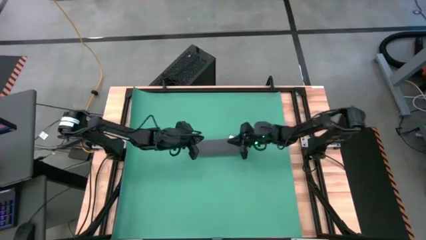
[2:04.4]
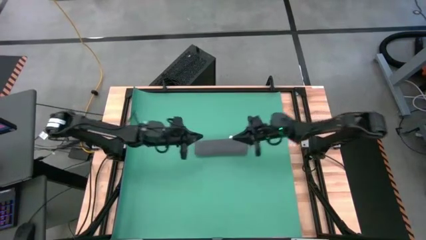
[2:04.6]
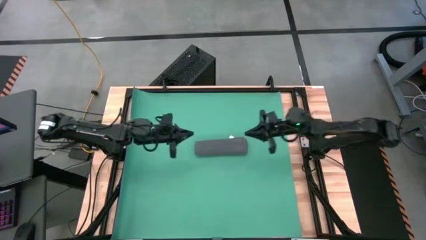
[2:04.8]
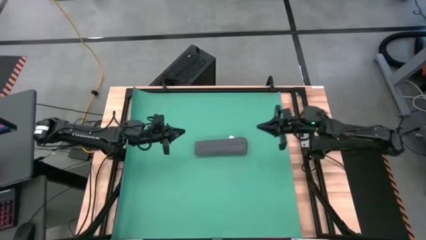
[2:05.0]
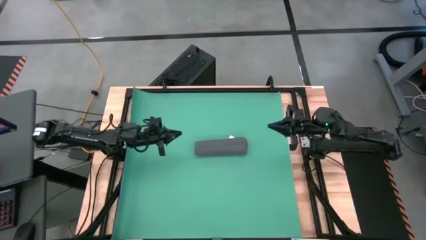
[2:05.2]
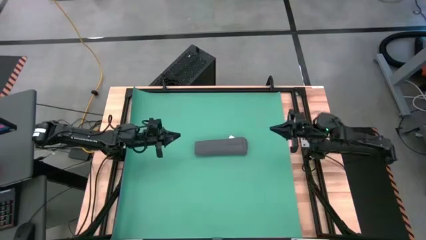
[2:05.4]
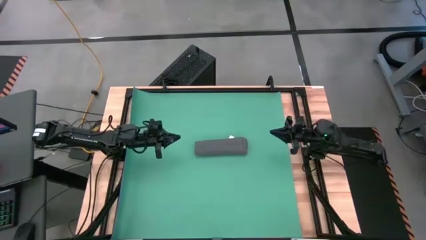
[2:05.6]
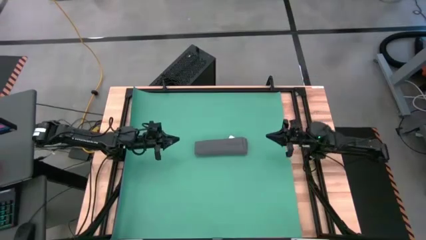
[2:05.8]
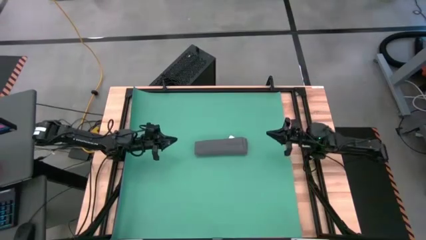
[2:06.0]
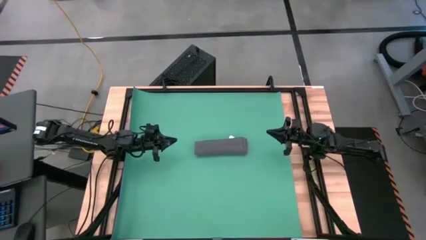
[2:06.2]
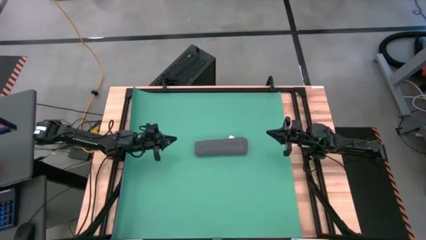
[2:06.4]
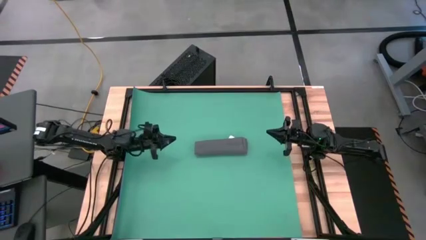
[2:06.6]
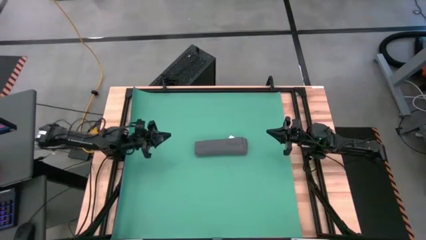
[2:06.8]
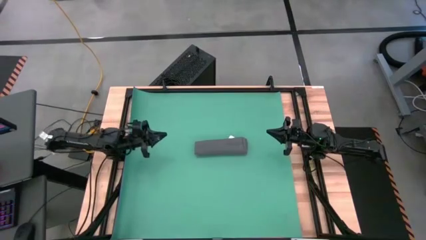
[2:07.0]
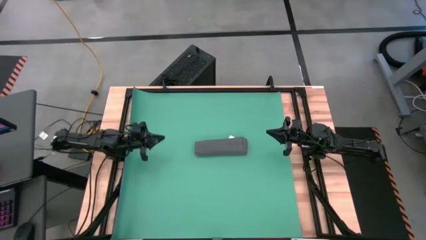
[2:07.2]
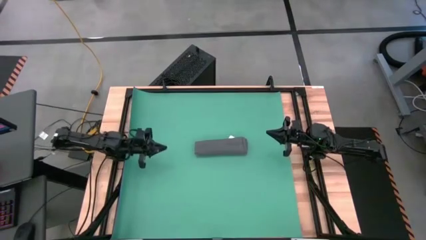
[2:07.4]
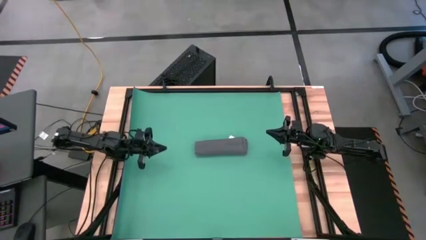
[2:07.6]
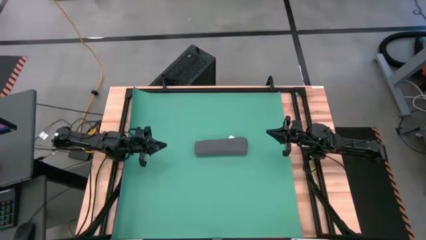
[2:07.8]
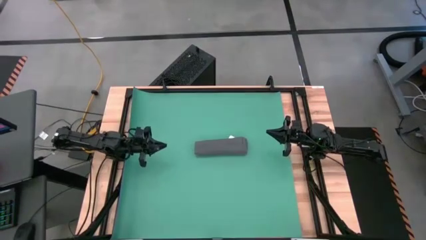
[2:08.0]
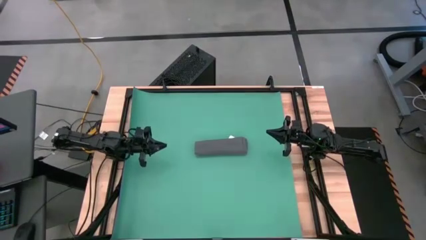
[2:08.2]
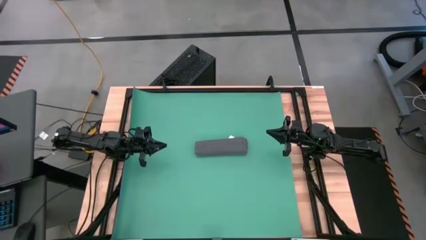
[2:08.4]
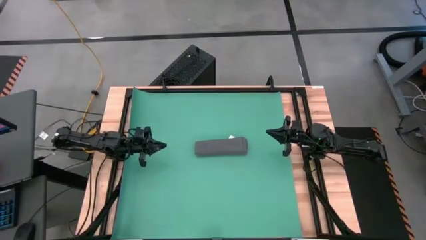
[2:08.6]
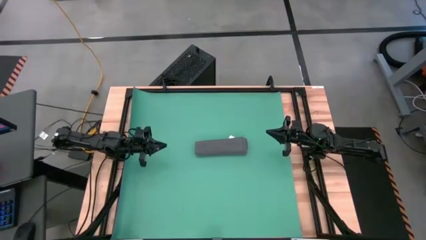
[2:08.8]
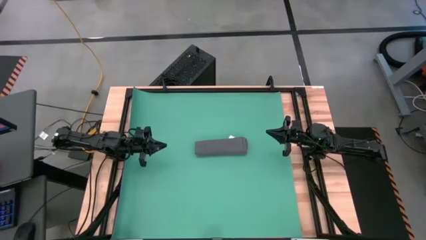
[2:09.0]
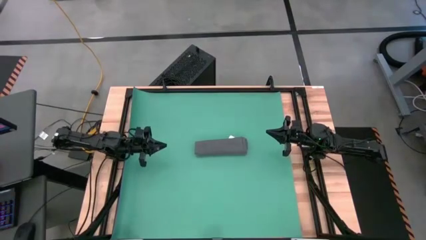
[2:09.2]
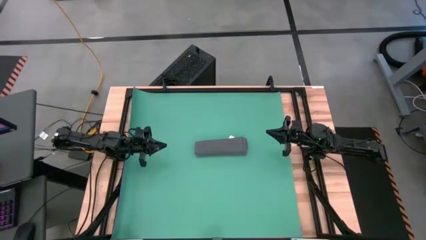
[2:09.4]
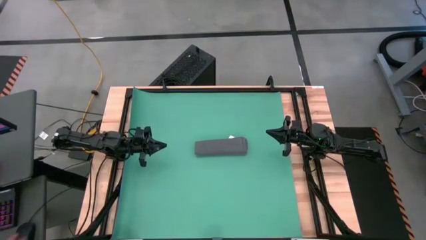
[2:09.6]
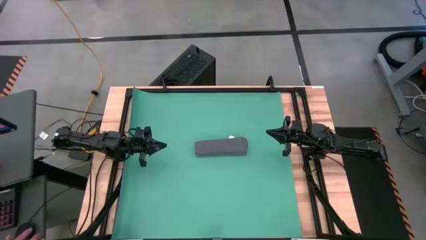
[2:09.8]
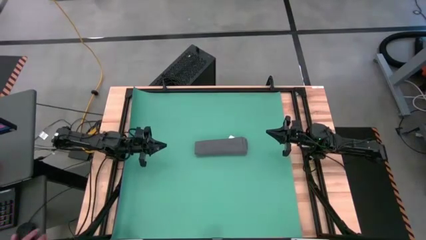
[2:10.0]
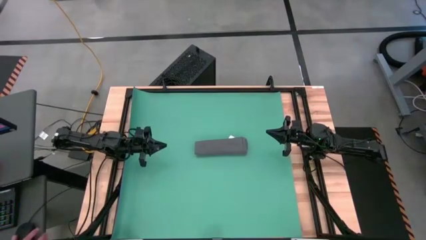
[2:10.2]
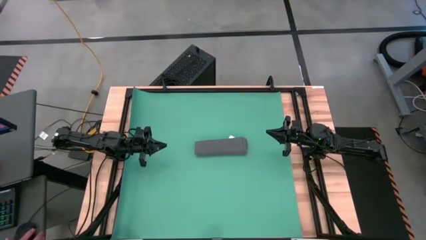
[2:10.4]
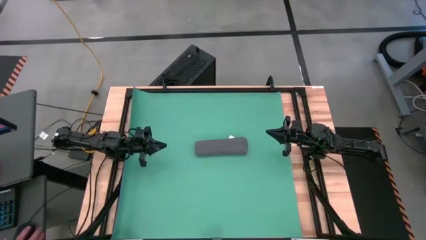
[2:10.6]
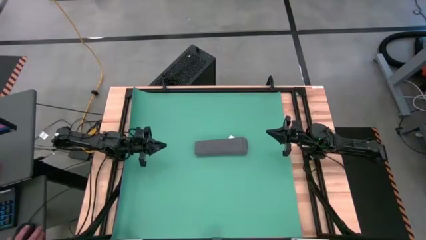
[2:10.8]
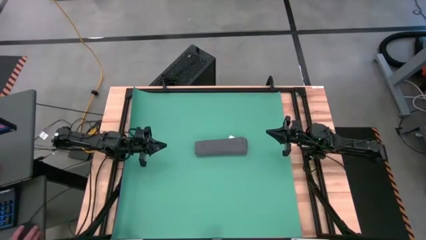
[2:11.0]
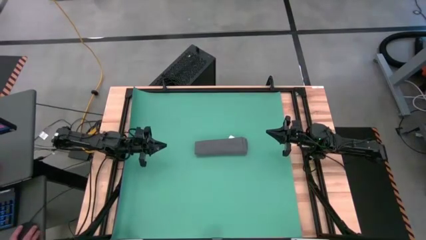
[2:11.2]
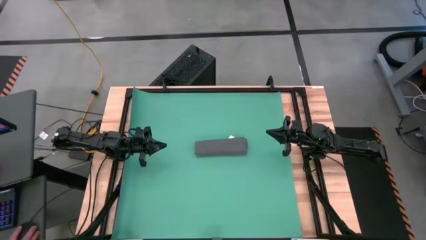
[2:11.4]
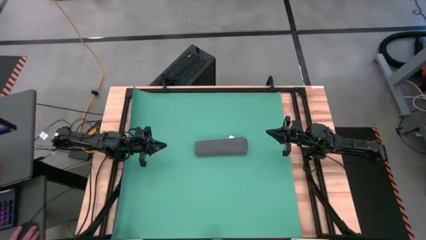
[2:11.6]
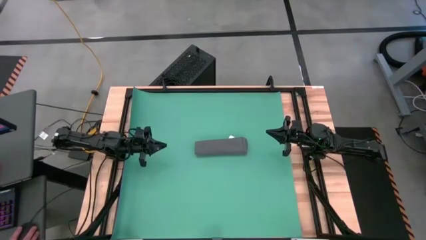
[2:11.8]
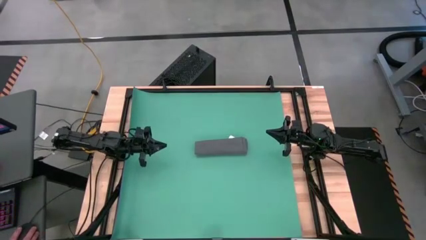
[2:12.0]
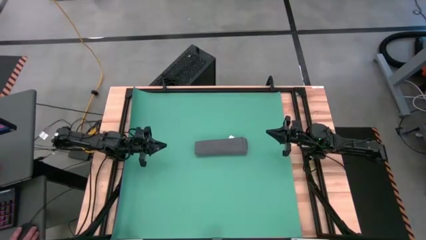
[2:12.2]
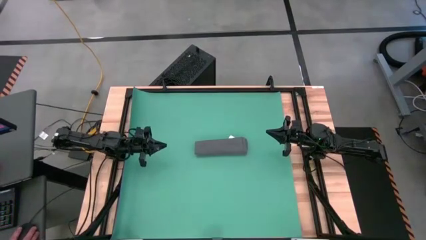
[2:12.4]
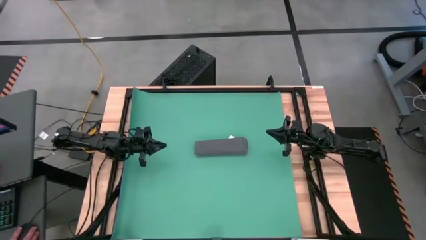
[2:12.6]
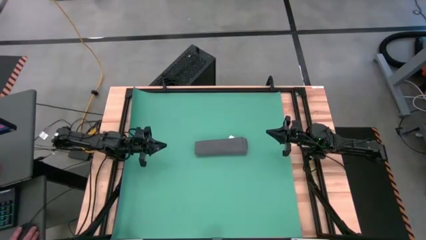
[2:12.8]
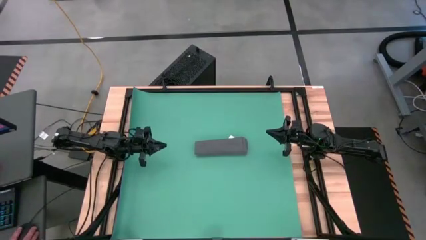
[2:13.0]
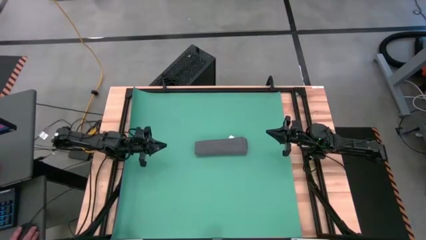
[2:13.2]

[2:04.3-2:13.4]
Task: Roll towel
Return to Home Position

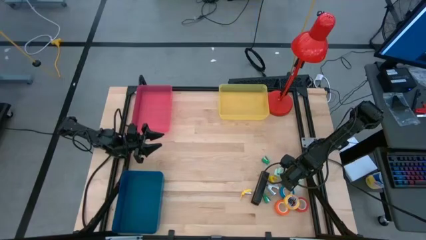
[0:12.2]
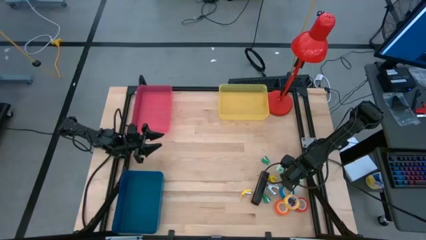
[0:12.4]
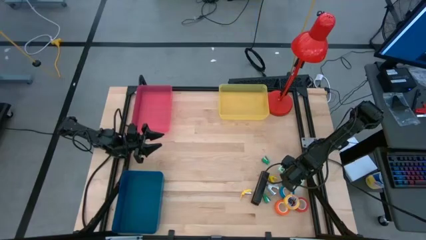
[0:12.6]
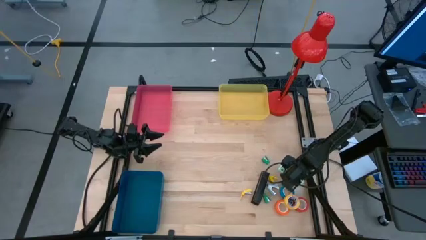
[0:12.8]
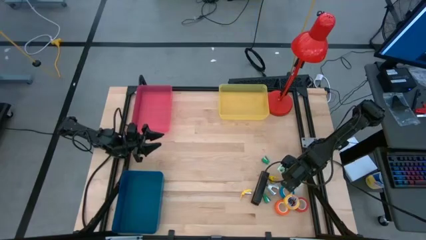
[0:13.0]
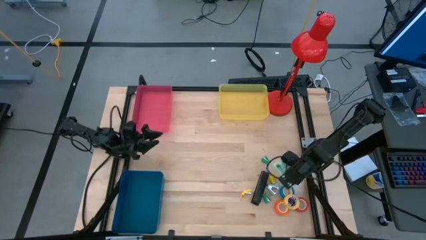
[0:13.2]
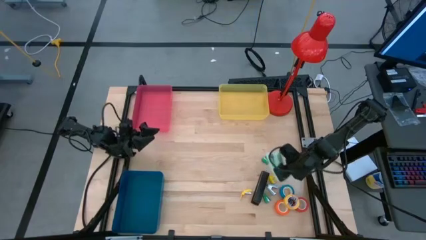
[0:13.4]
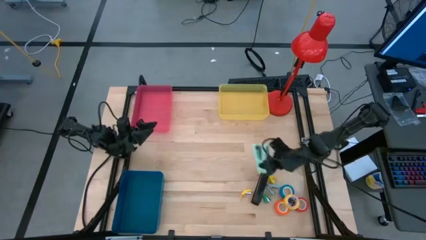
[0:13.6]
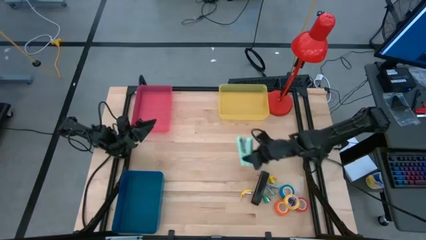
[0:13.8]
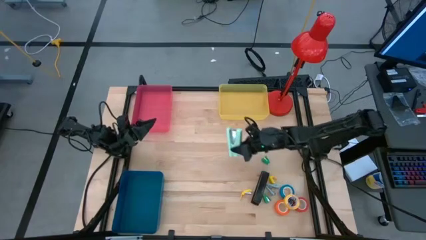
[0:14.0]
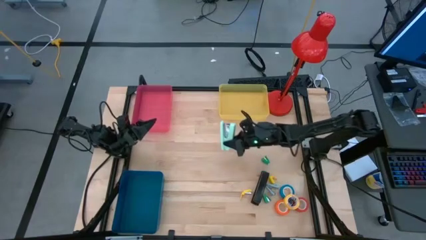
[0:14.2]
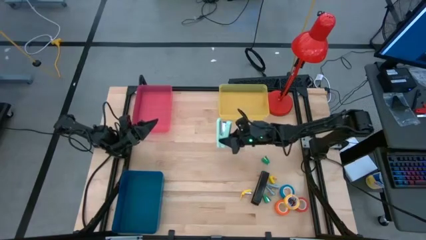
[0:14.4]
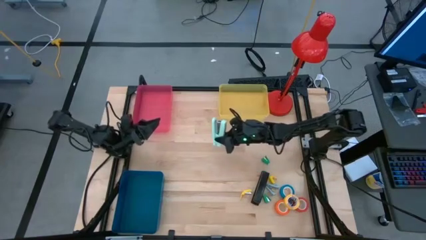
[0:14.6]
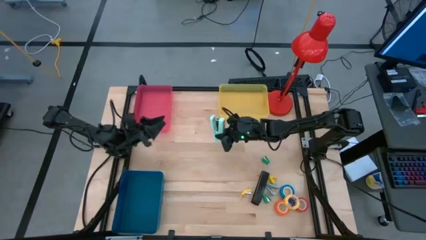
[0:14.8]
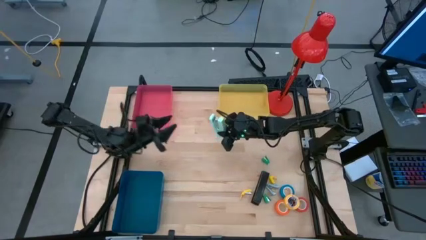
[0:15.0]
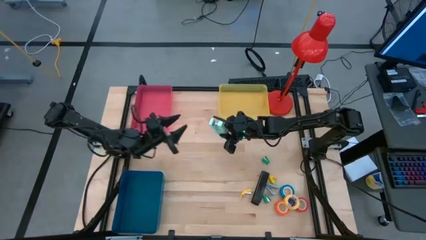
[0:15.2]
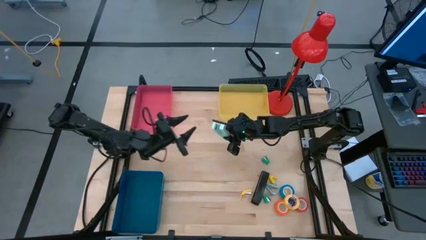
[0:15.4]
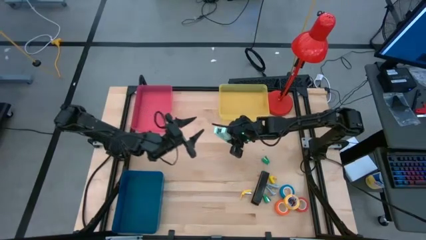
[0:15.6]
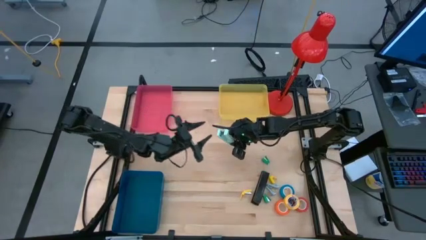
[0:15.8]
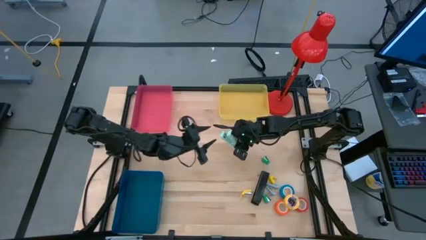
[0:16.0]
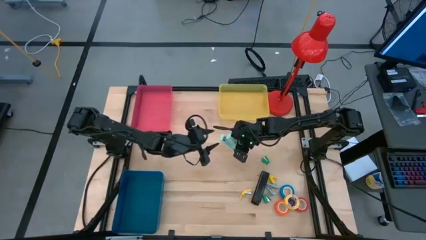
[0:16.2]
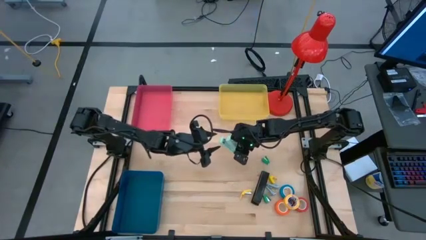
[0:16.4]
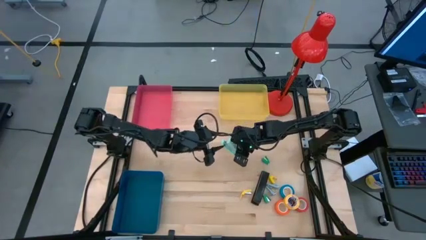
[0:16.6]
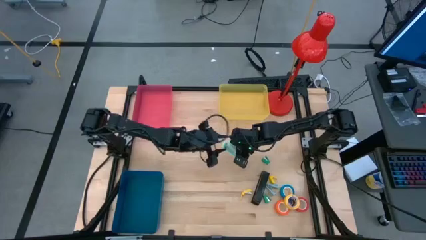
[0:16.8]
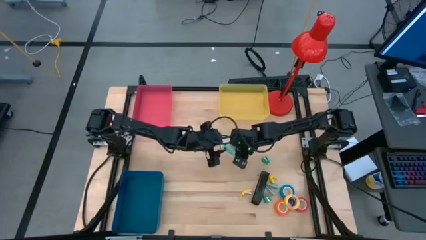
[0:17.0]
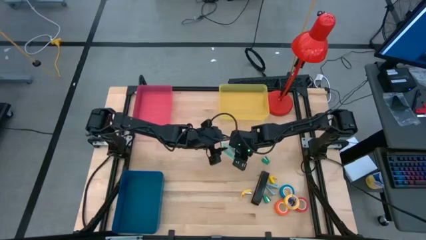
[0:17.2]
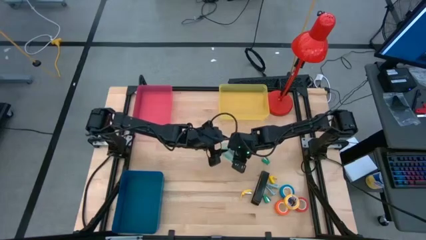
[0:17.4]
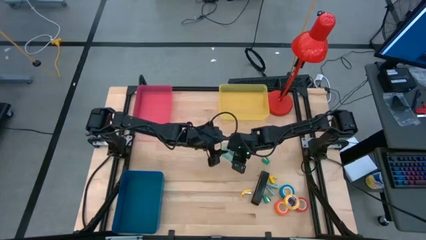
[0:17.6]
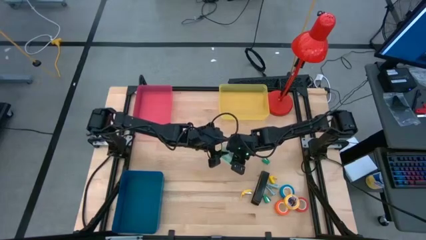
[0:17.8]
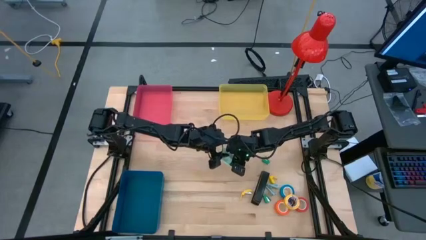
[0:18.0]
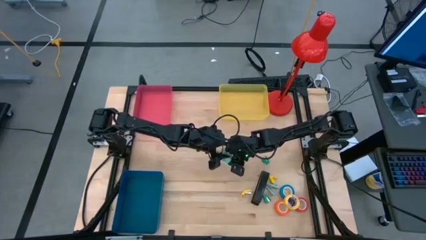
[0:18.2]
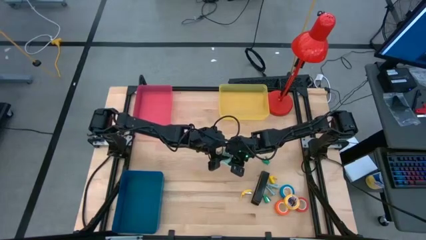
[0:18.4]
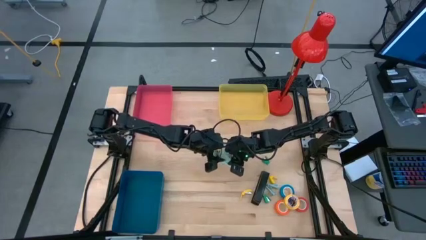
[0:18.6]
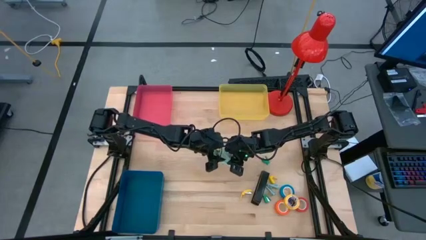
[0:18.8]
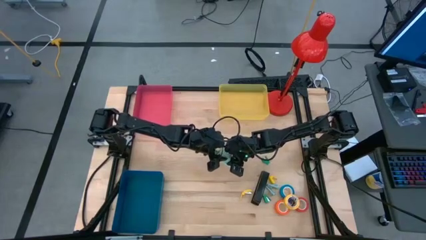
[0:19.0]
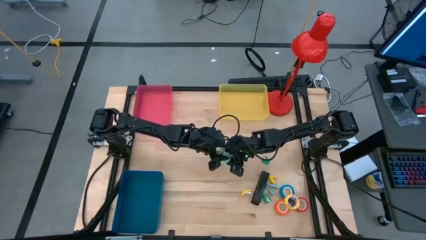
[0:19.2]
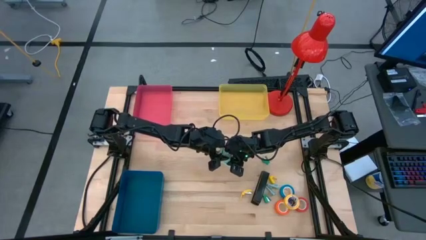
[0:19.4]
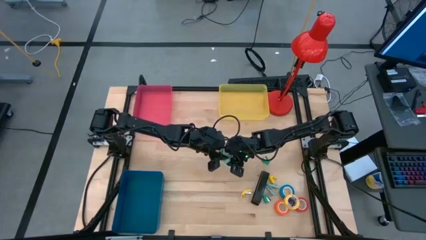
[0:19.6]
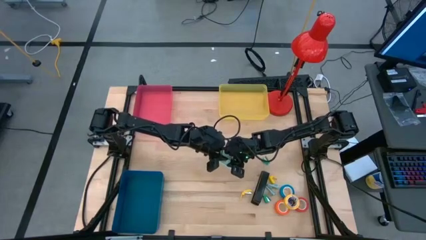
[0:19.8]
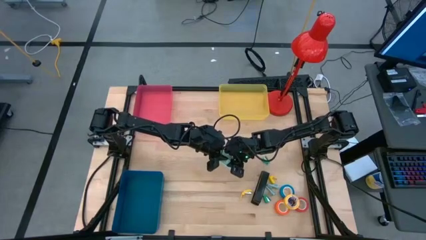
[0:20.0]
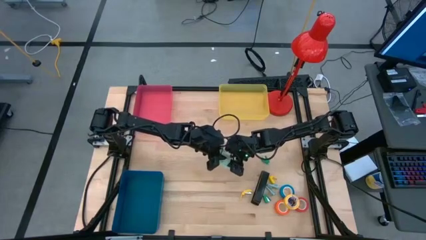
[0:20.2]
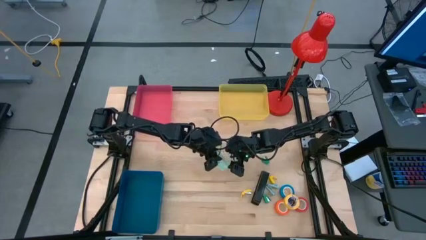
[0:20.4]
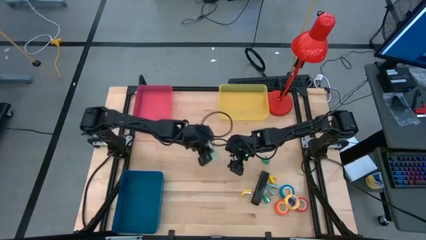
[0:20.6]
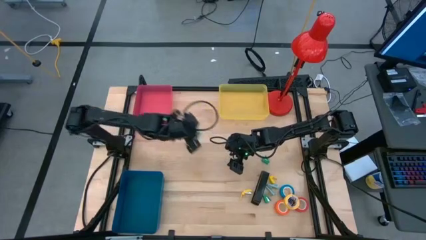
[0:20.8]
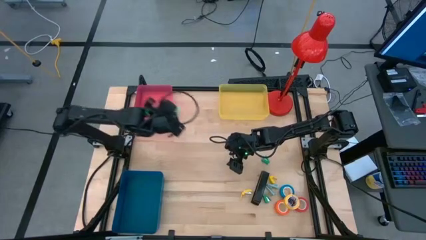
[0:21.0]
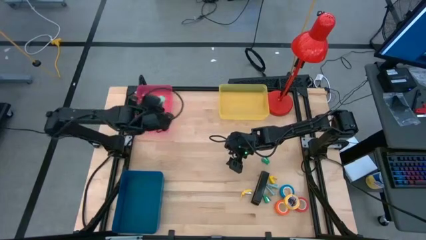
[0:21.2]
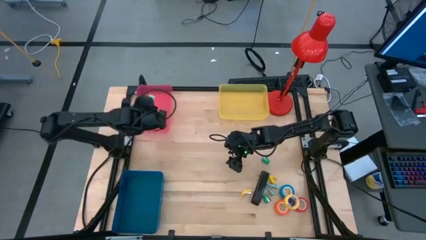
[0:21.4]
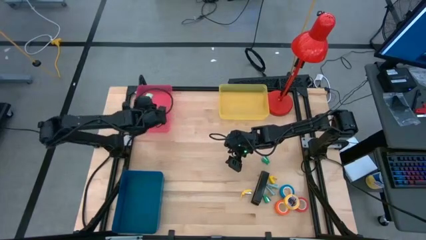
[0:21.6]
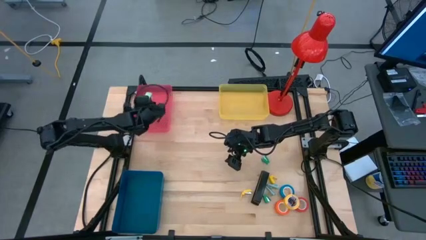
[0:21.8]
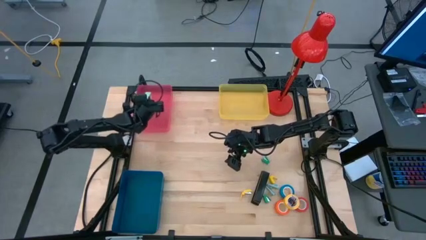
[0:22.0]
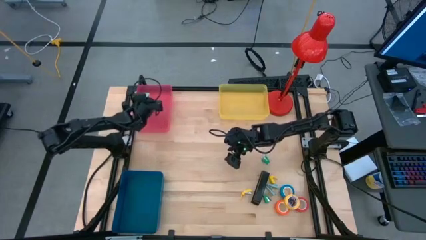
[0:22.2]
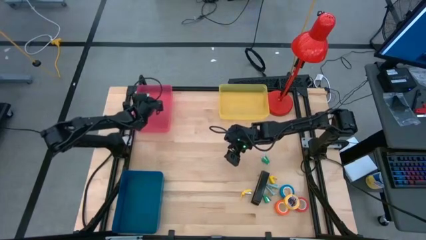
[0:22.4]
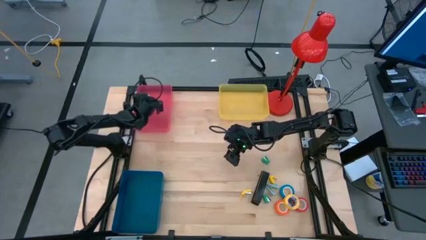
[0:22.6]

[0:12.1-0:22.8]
Task: Pick and place Stapler, Stapler remover, tape
Put the light blue stapler into the red bin
